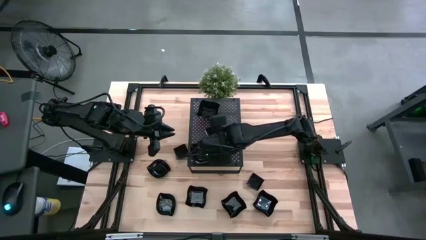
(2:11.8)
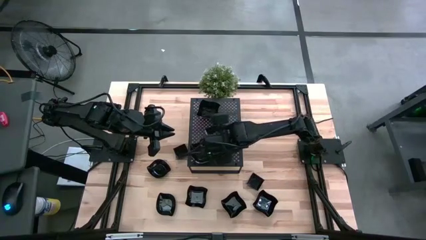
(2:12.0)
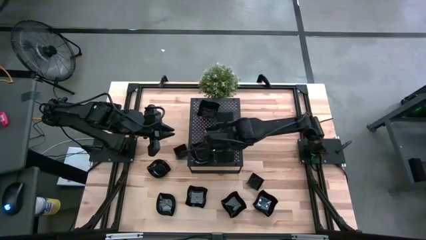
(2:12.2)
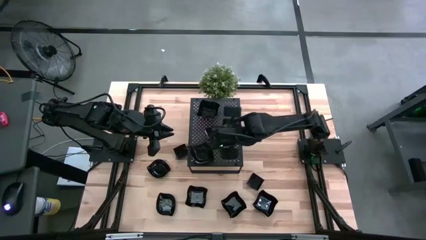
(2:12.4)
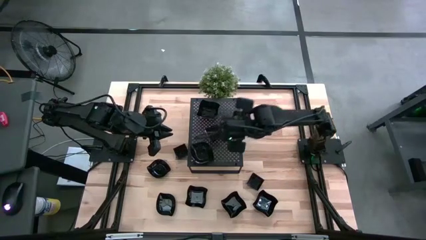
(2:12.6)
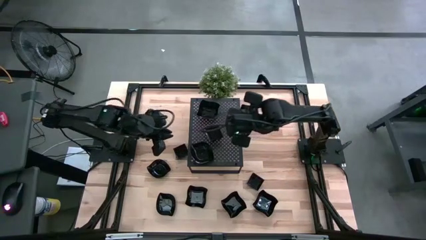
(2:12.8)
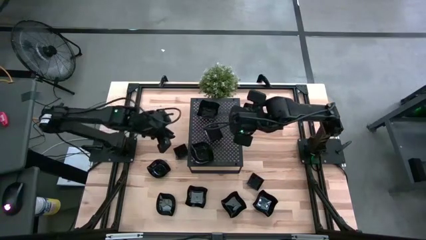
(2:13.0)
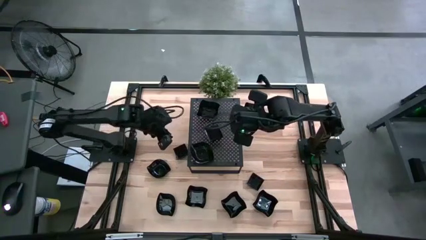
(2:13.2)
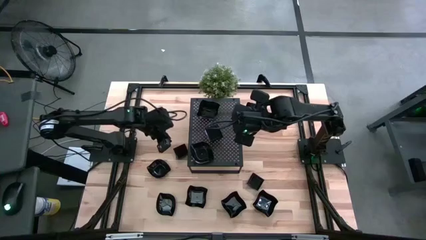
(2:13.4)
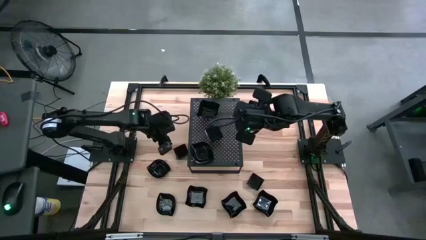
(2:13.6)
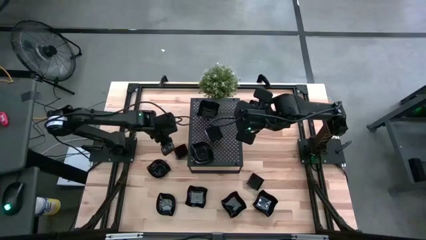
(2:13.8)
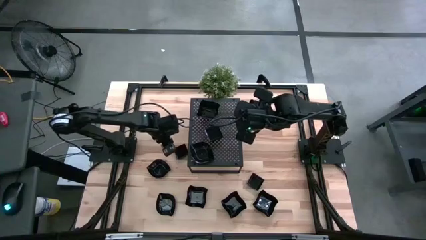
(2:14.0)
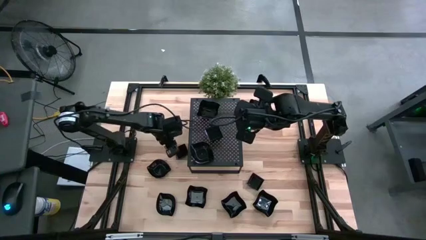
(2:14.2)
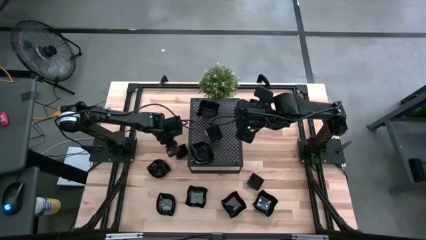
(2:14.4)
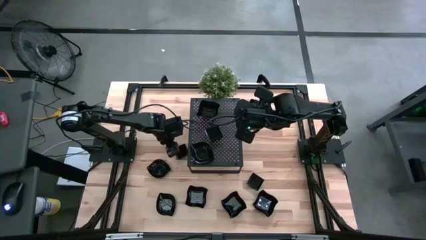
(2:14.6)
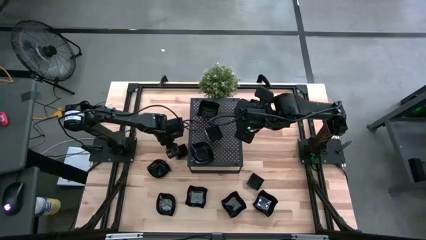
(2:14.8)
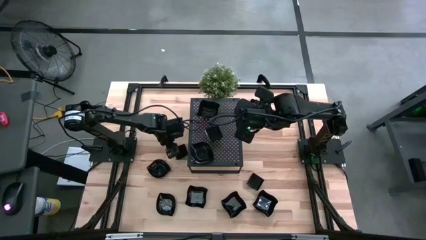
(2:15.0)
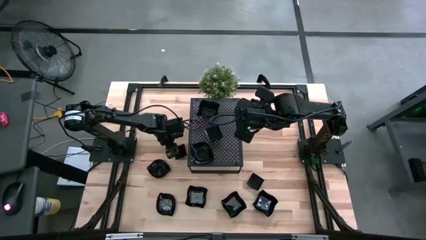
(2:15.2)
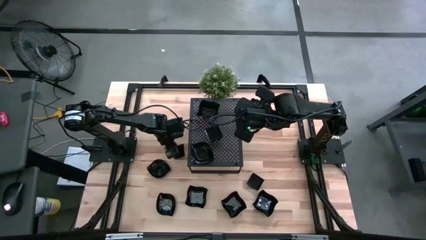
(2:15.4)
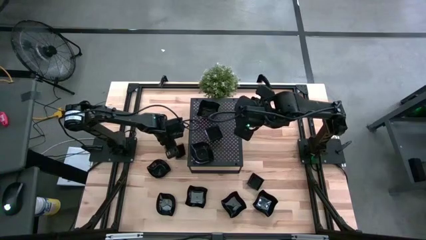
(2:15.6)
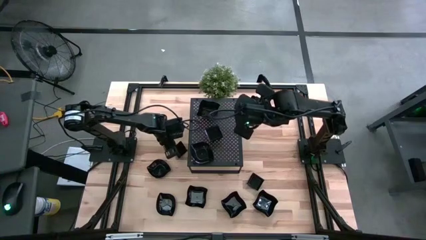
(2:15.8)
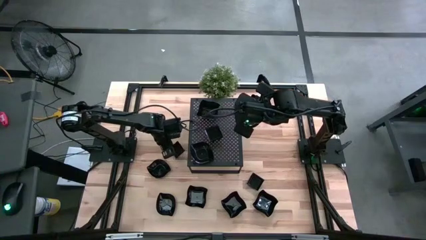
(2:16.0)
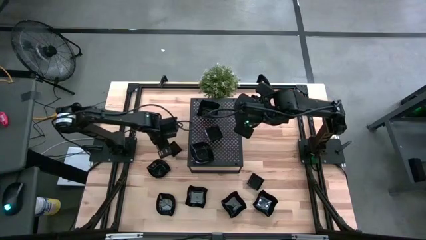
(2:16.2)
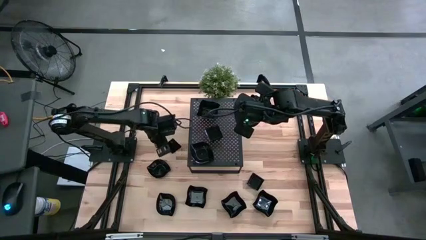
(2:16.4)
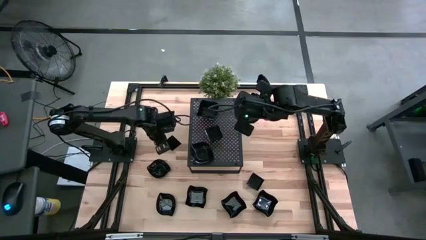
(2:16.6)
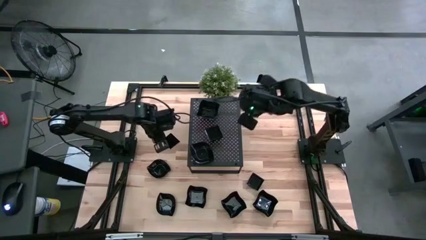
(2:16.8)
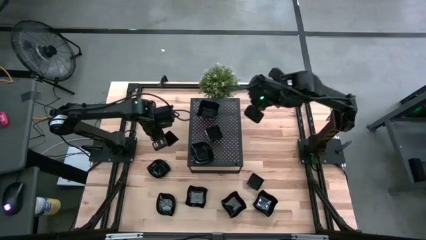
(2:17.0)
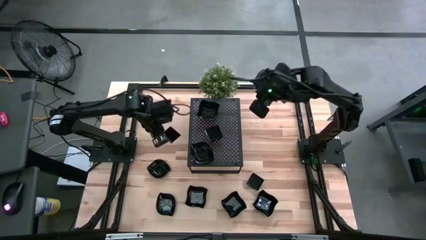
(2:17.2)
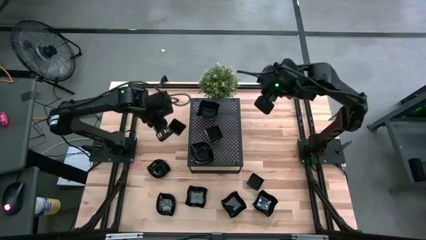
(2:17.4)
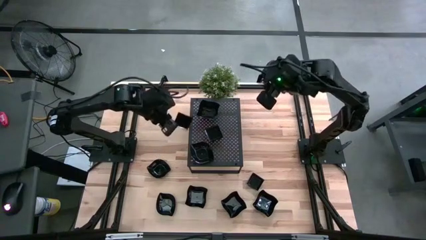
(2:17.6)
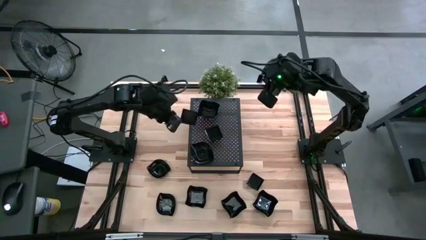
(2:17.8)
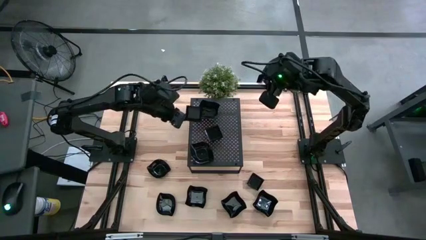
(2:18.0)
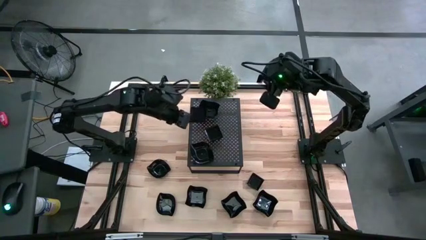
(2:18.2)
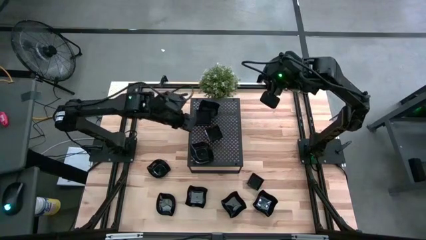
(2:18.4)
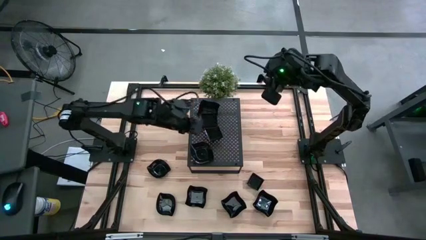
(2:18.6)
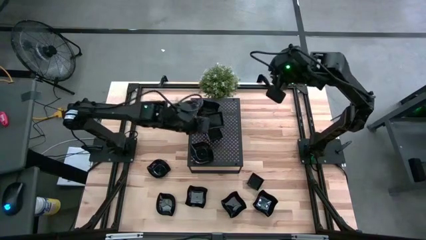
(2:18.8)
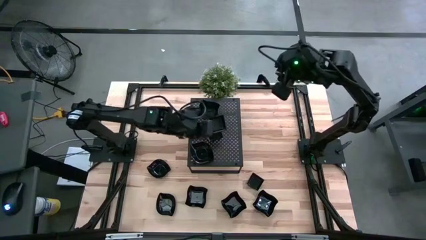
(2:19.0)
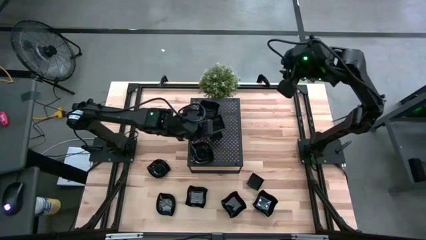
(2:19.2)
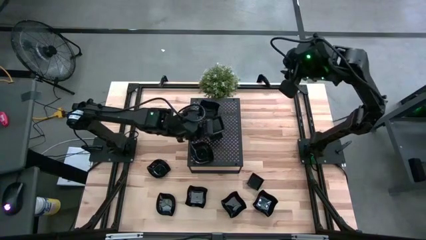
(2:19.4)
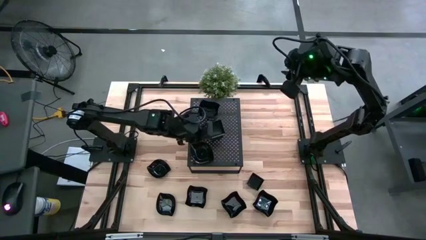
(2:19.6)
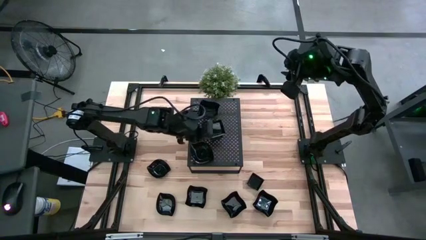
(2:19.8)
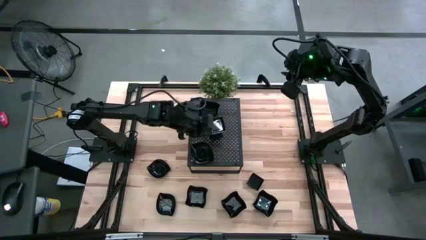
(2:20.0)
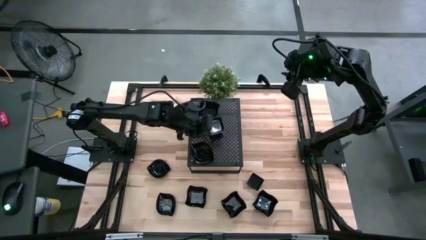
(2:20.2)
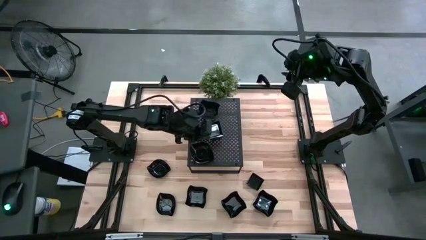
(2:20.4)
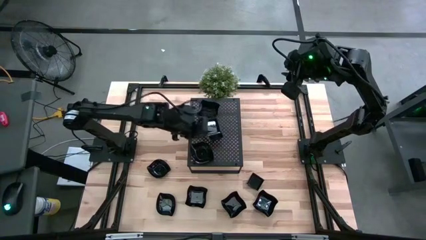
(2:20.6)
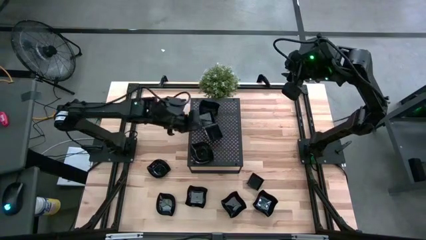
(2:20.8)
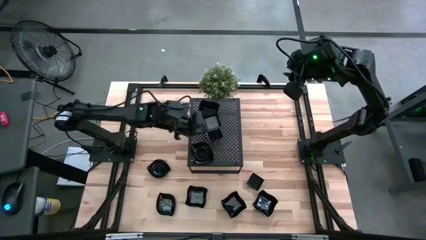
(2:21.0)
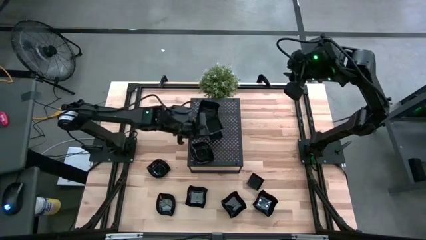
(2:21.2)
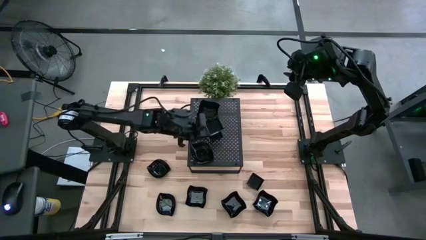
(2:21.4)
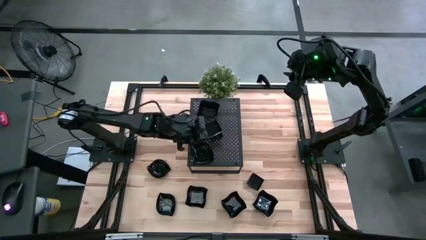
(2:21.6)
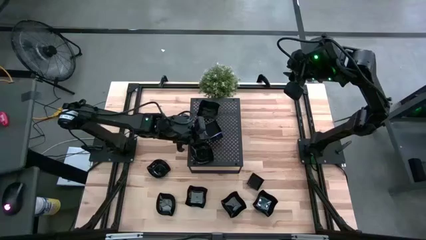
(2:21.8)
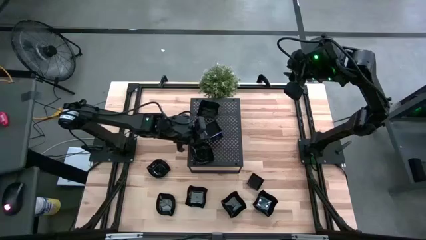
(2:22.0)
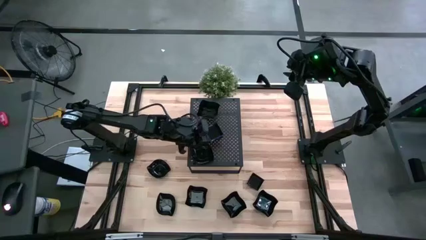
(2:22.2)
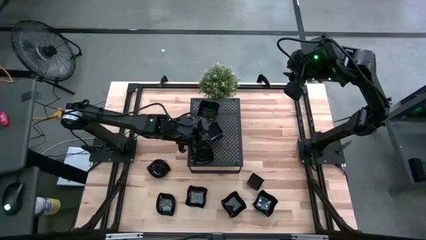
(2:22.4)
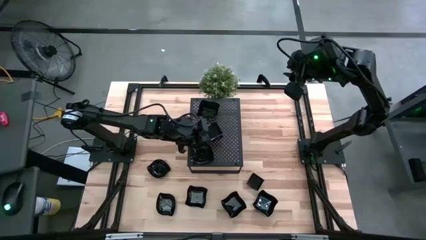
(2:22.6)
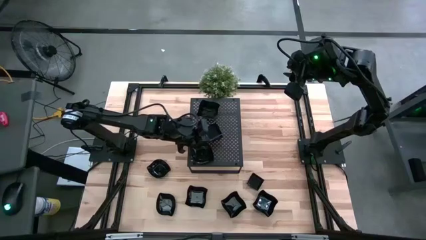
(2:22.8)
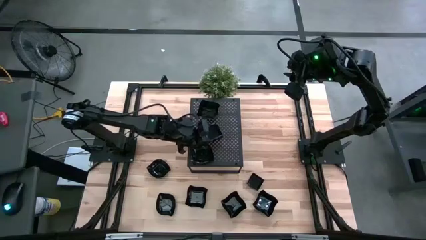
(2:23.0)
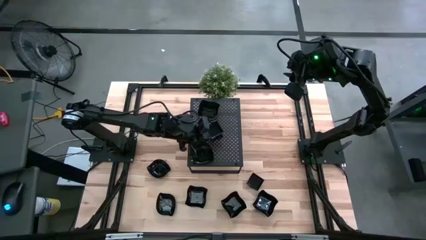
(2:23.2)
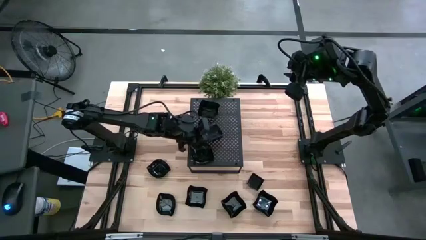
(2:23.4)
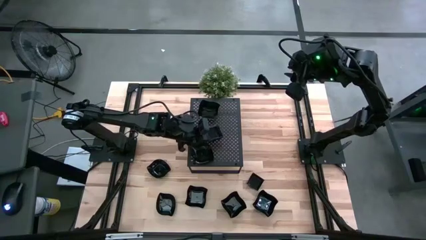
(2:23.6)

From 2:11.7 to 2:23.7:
Task: Pick & Place Mini shaped plates
Stack the square plate on top of the square plates on the shelf
